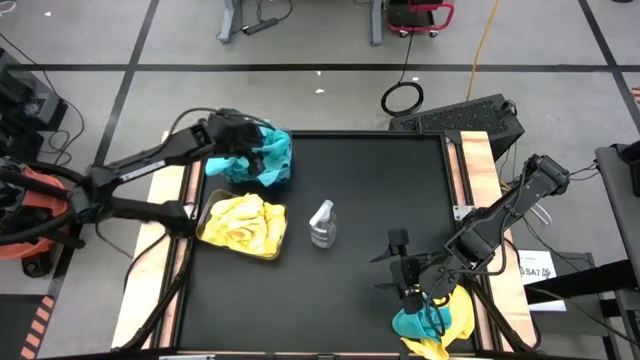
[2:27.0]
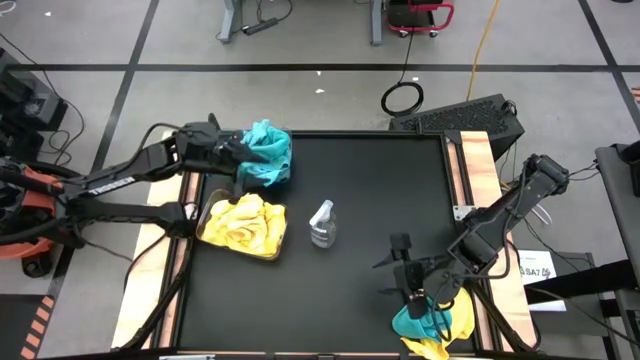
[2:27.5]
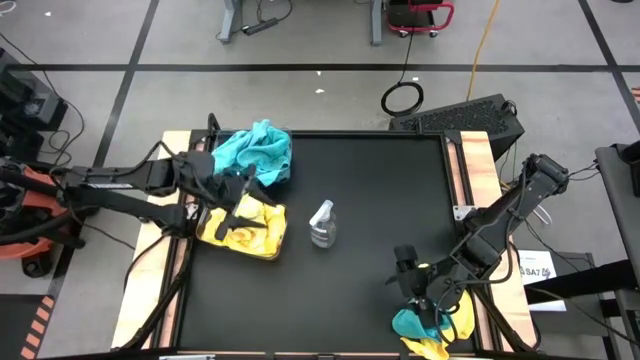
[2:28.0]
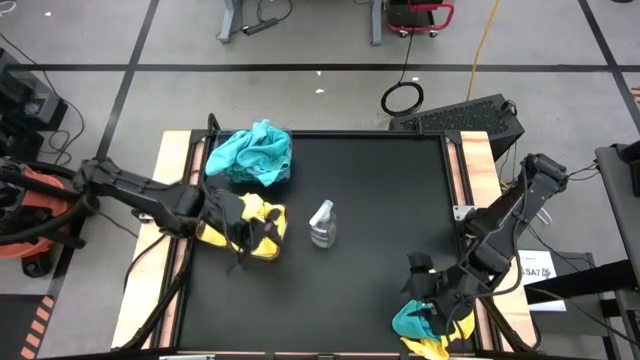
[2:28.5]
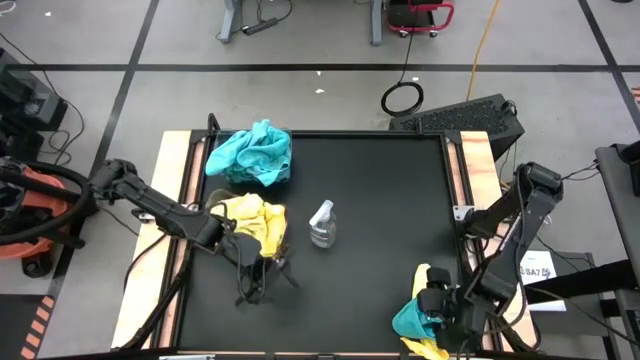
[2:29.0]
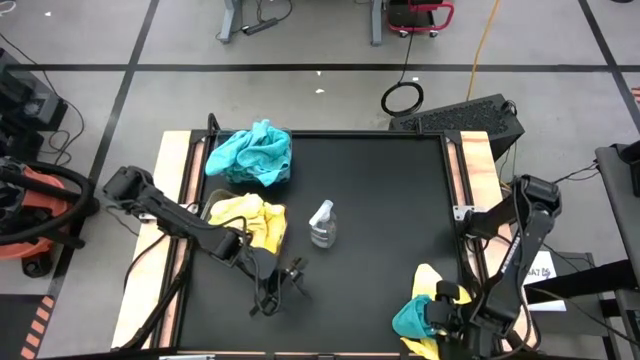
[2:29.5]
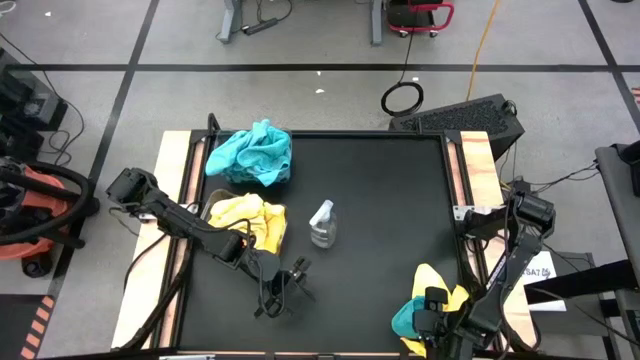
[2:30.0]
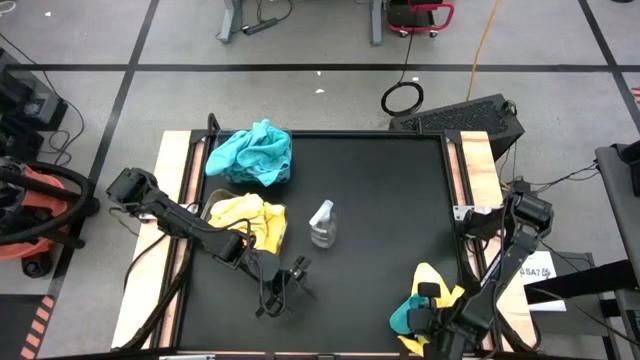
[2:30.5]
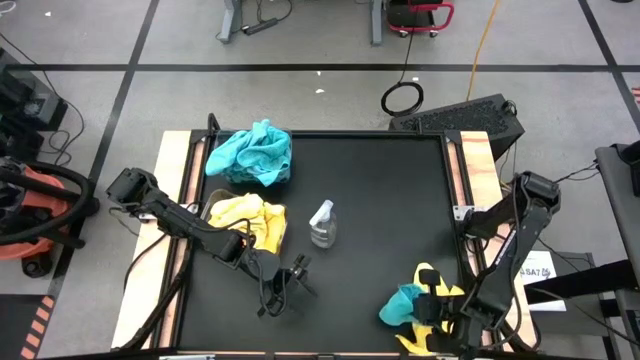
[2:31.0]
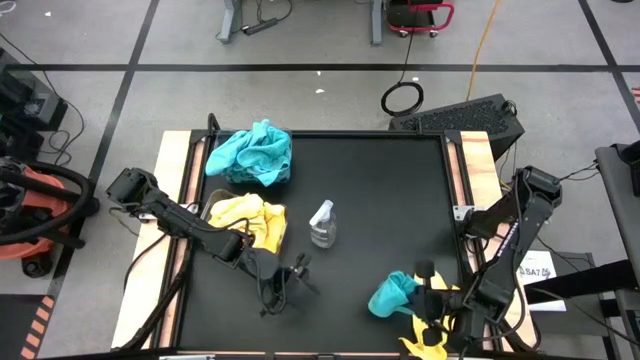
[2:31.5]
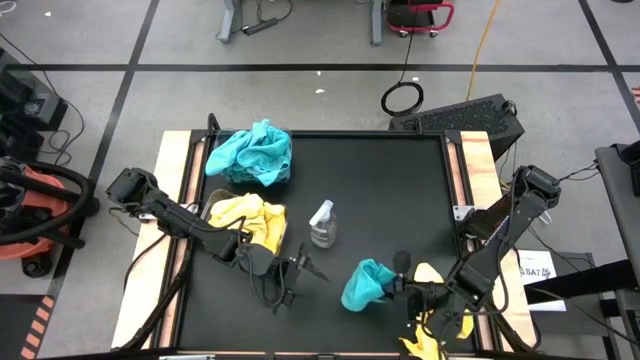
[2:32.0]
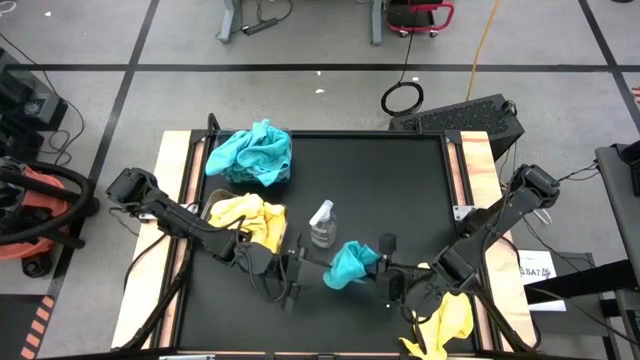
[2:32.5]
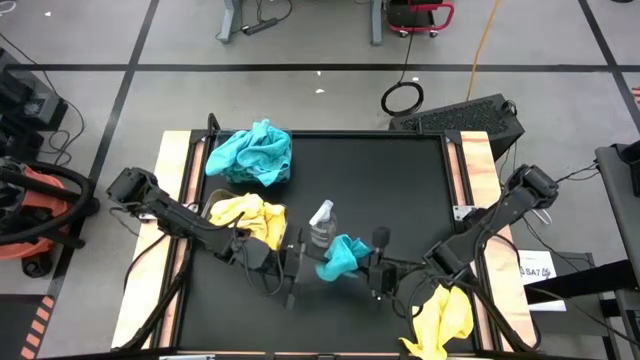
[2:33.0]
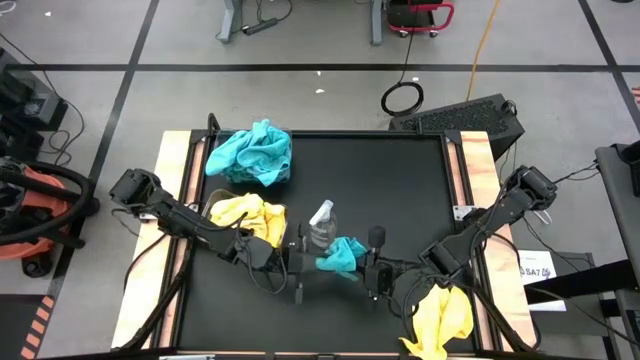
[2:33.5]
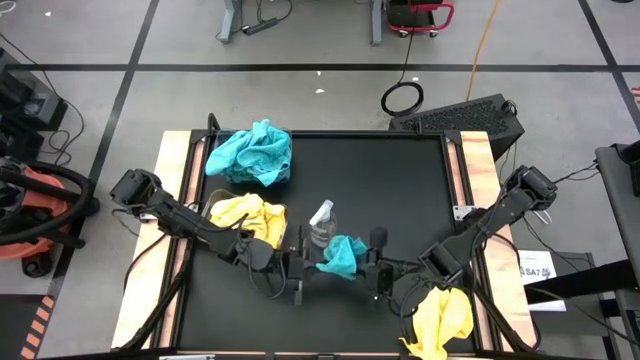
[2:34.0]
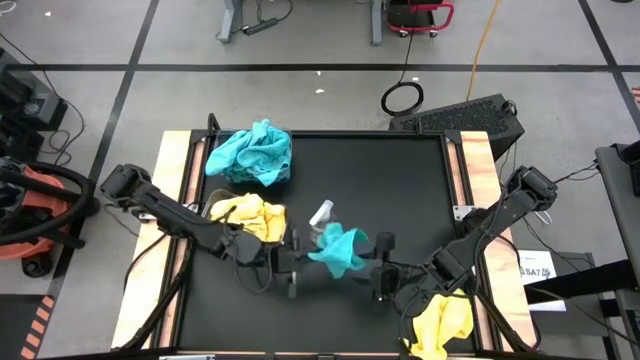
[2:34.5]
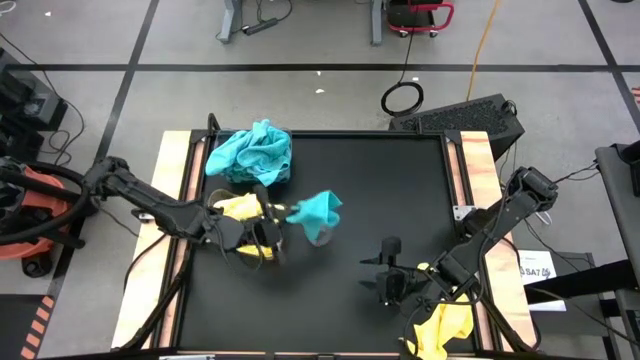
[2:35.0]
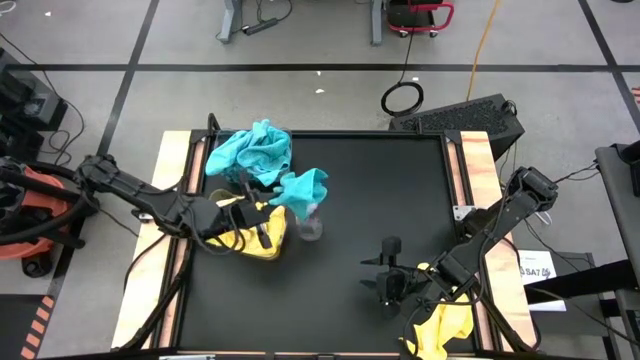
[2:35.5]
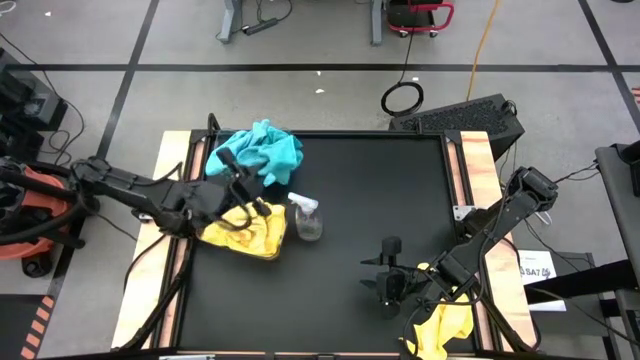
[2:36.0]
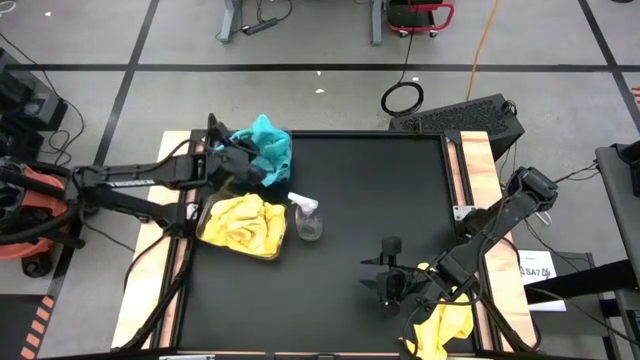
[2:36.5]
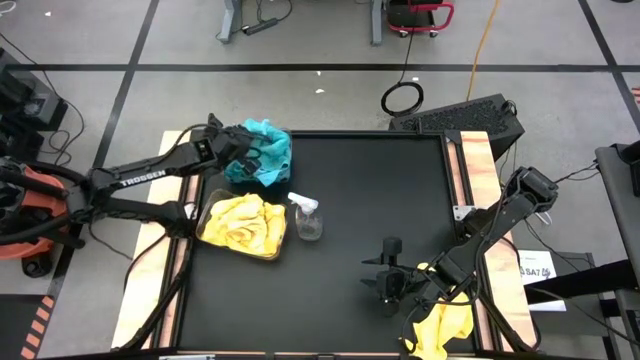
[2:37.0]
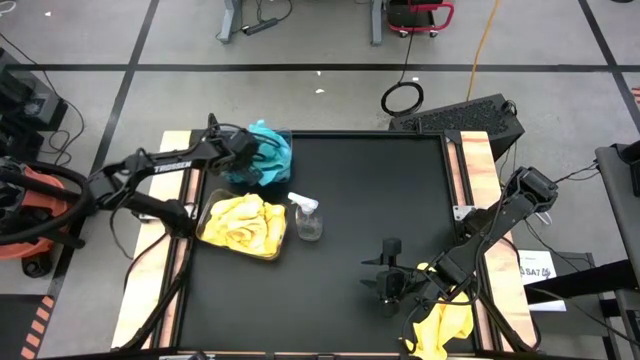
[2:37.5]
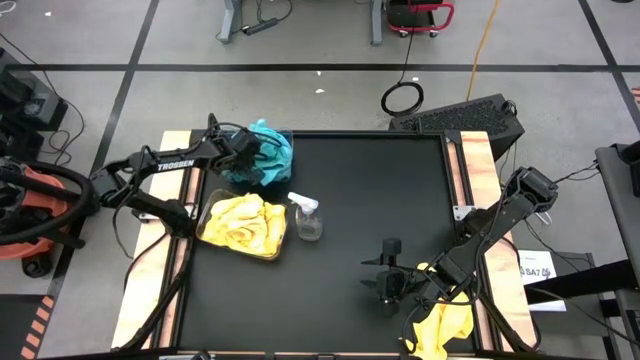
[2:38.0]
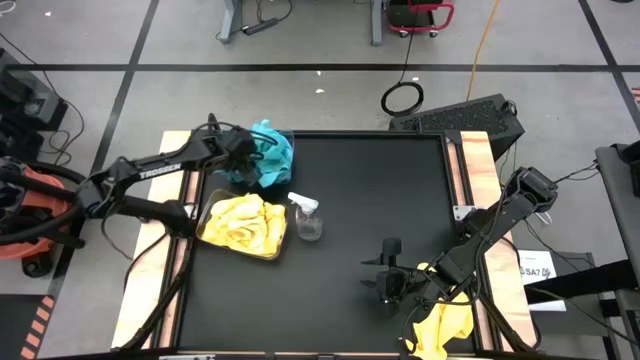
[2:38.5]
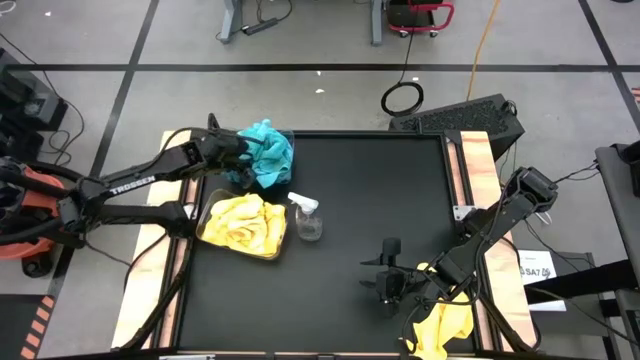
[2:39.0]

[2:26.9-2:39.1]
Task: Sort microfiber towel by color & place in baskets
Put the blue microfiber cloth into the top transparent bin

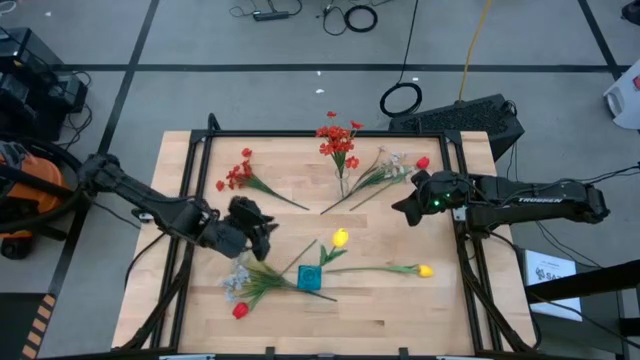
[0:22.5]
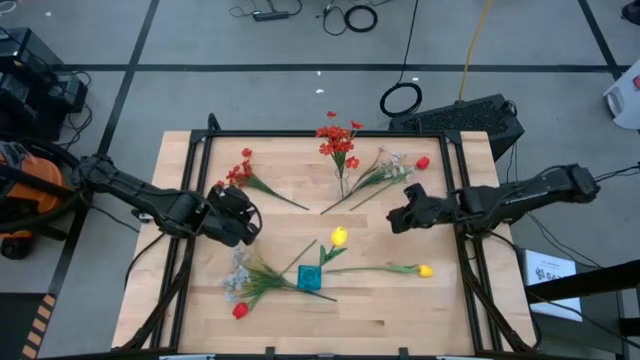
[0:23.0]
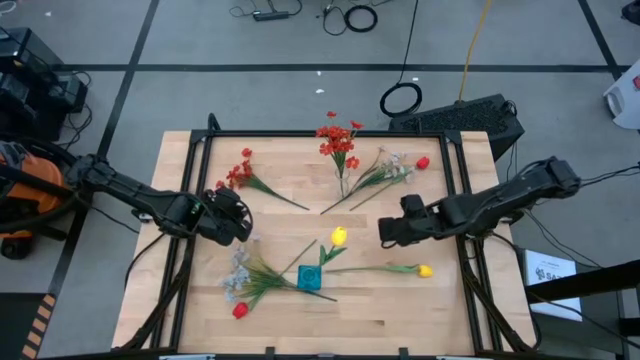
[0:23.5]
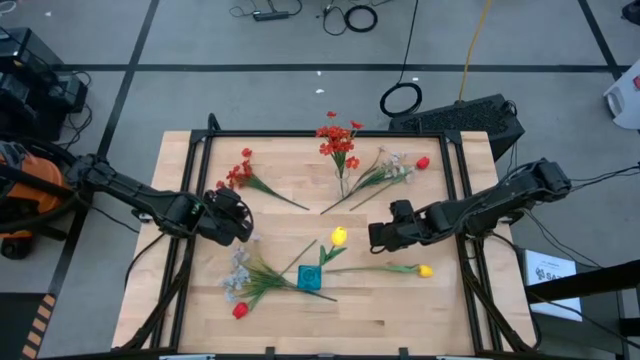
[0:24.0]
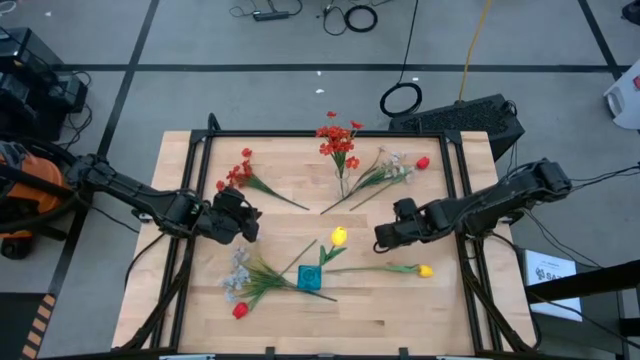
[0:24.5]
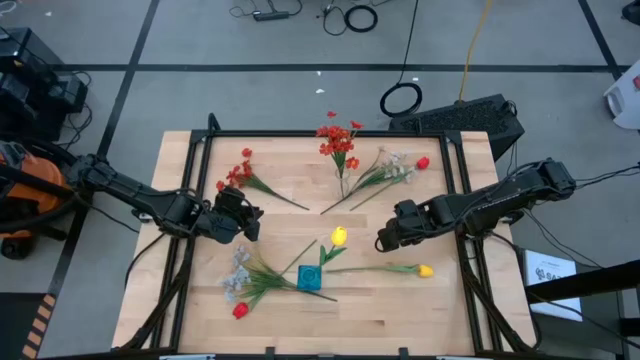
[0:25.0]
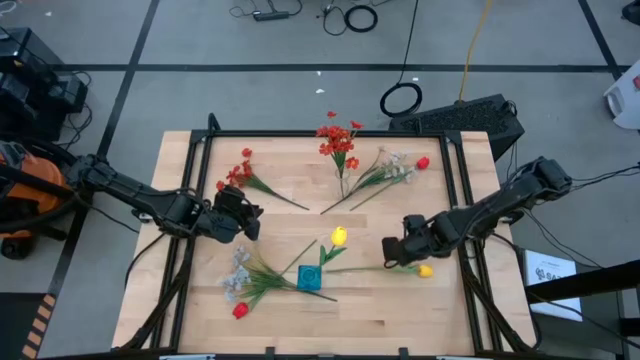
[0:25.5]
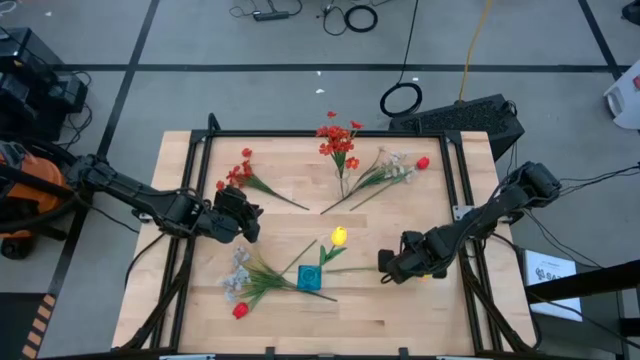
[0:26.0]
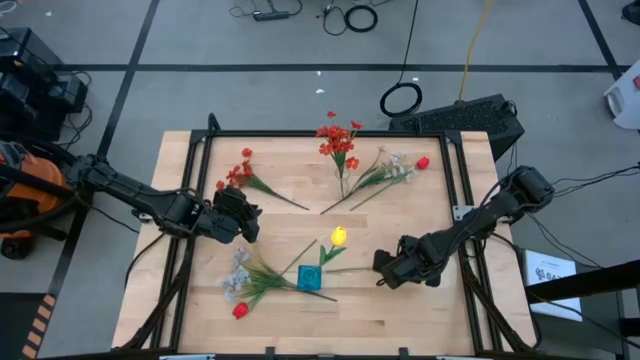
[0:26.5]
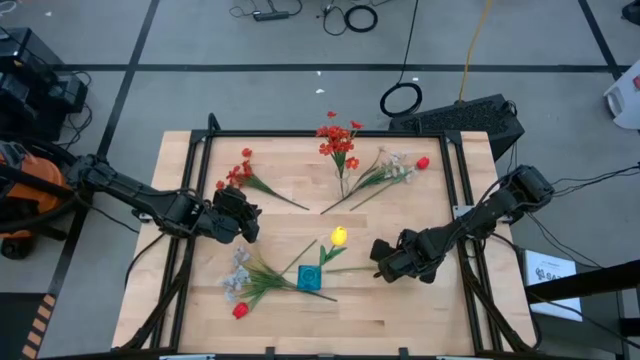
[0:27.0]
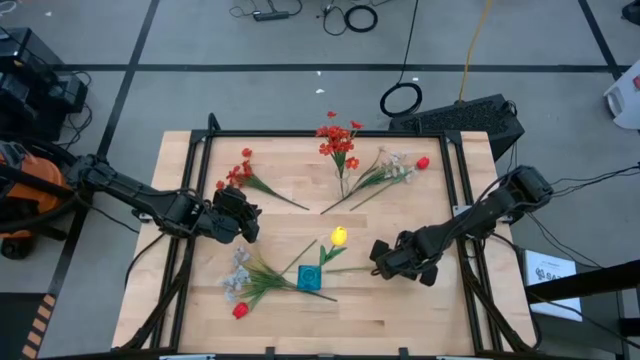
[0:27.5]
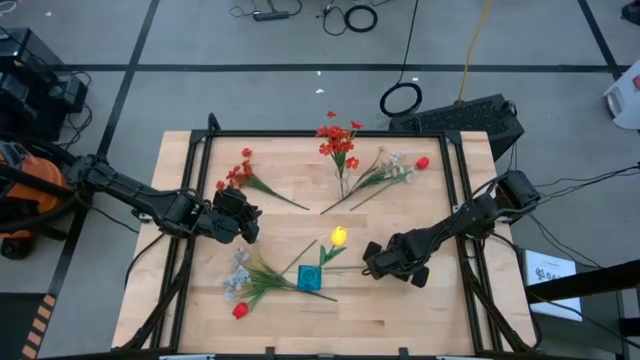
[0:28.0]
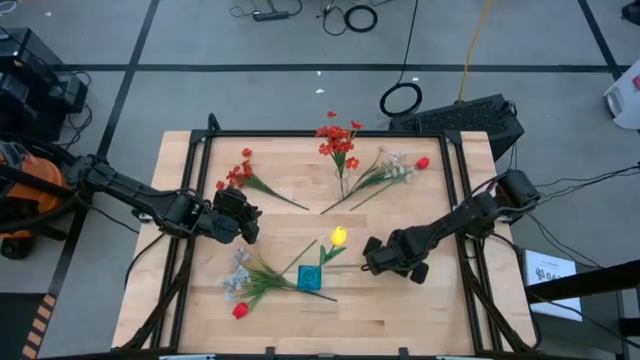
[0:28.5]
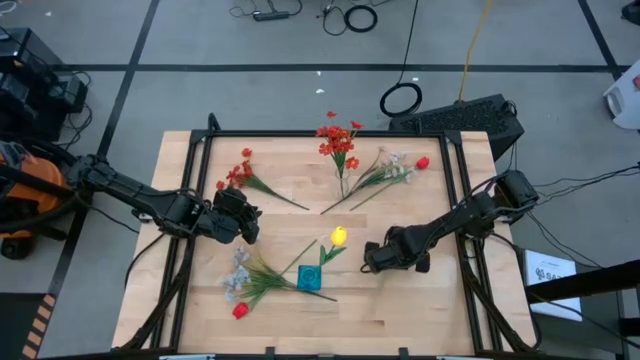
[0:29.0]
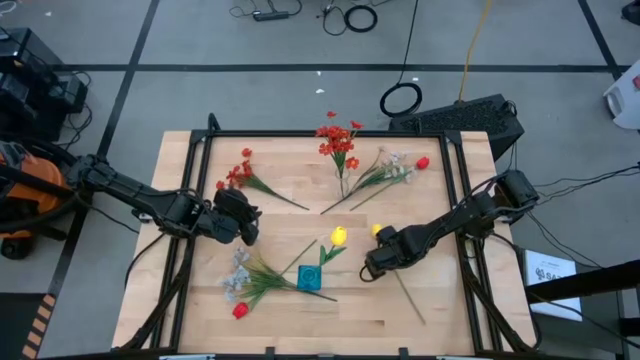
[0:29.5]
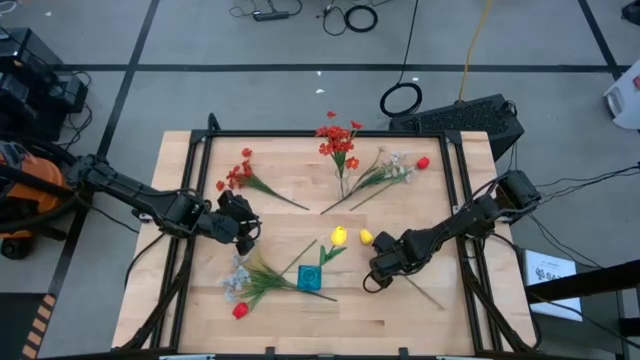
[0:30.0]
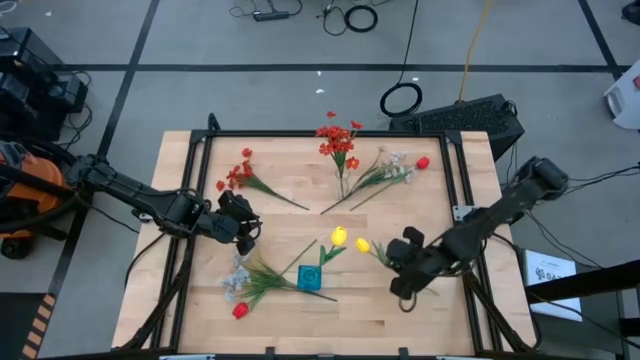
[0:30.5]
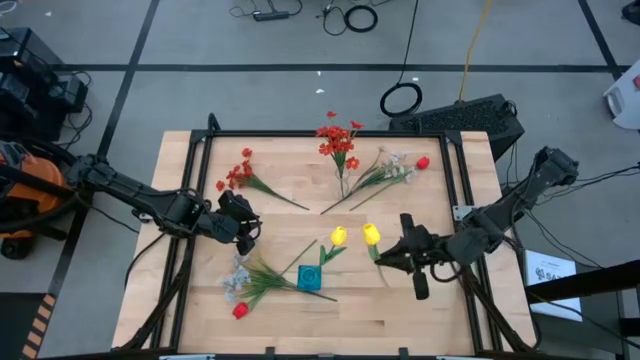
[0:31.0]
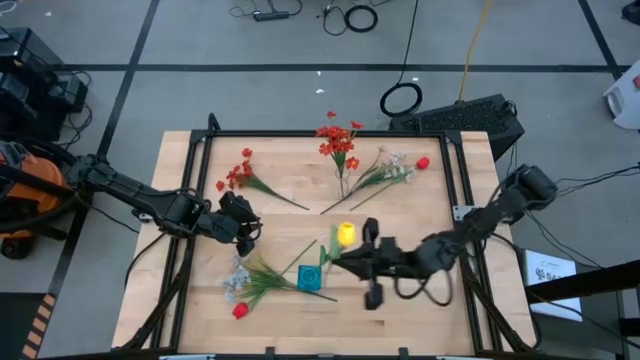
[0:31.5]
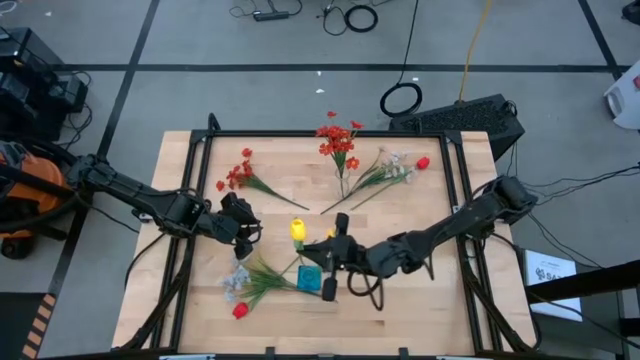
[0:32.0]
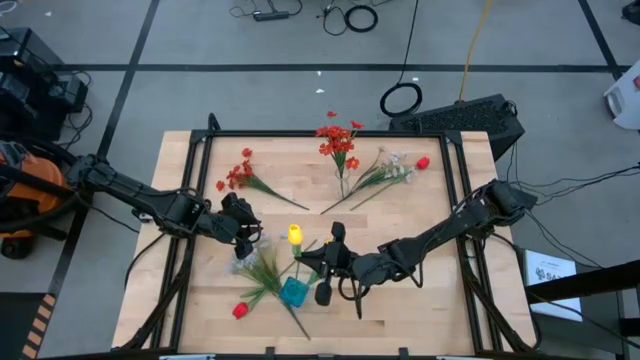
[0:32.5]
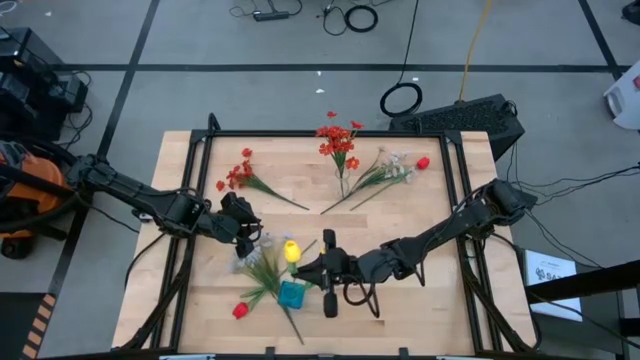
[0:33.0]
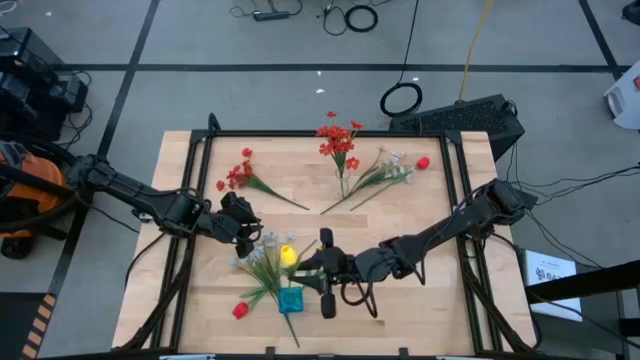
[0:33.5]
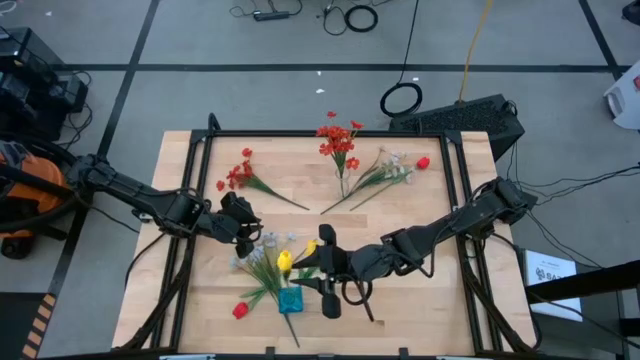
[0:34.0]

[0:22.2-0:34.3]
Task: Sort flowers into vase by color
Put the yellow tulip into the blue flower vase
